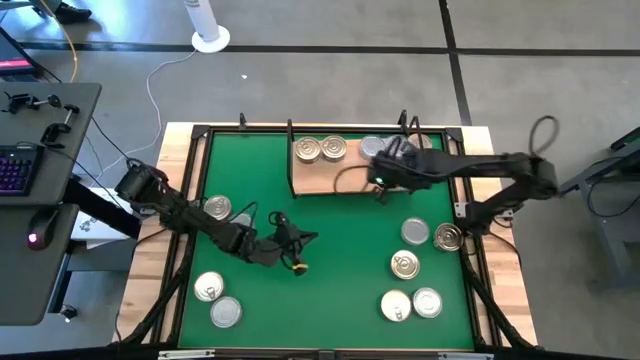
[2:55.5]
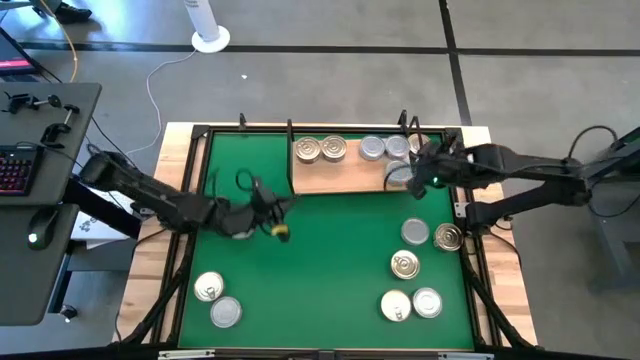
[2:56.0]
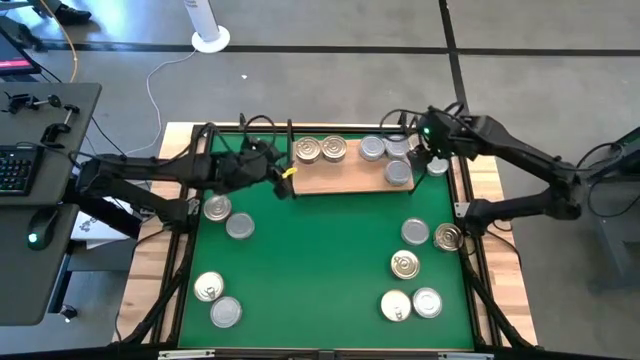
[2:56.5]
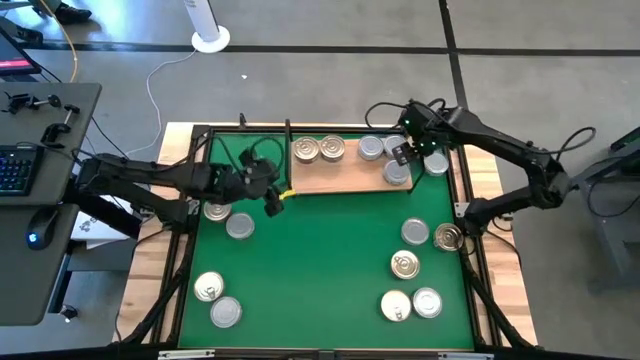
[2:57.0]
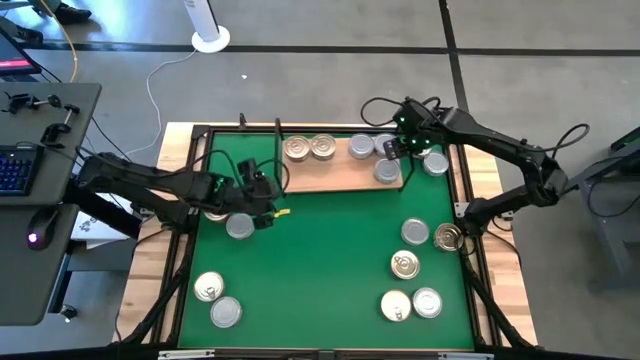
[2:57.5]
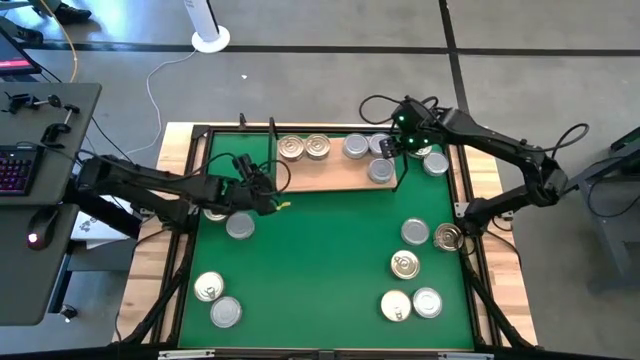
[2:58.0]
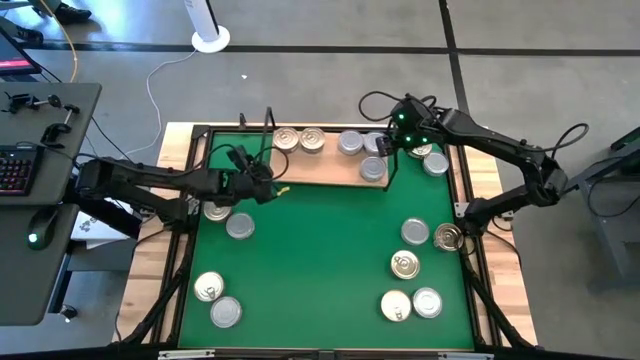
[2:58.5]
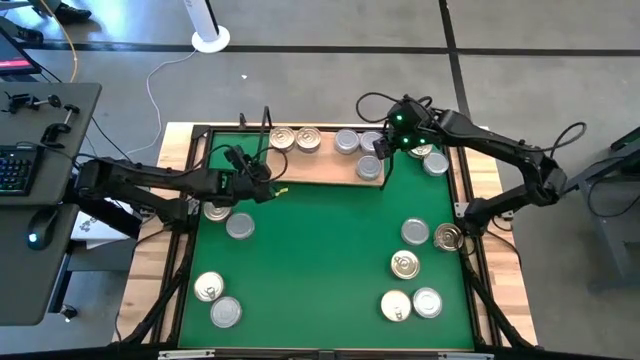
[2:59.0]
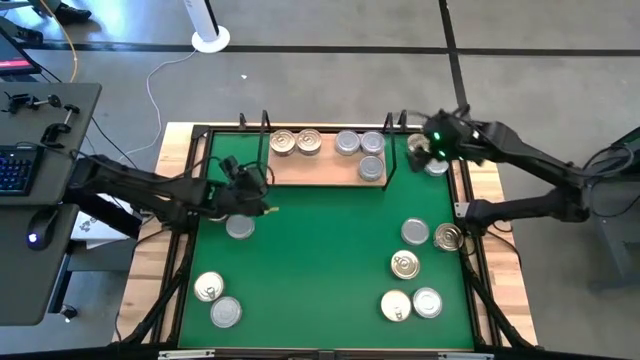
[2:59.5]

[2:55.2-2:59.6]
Task: Stack canned seafood by type on shelf
Adjust the shelf

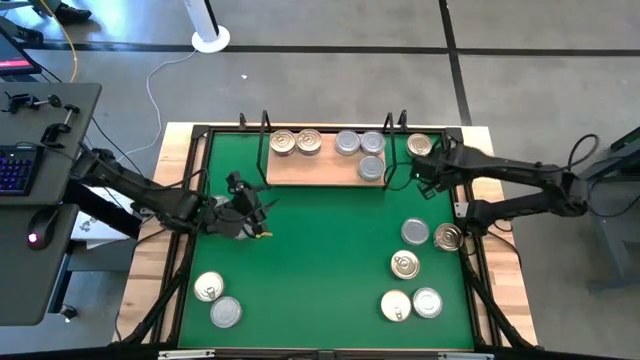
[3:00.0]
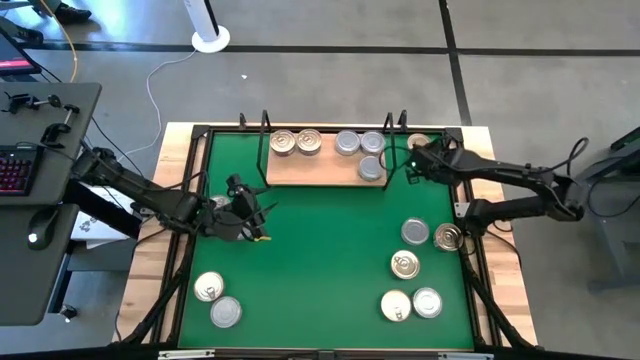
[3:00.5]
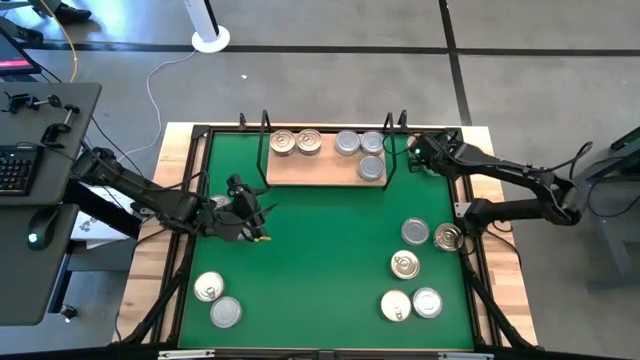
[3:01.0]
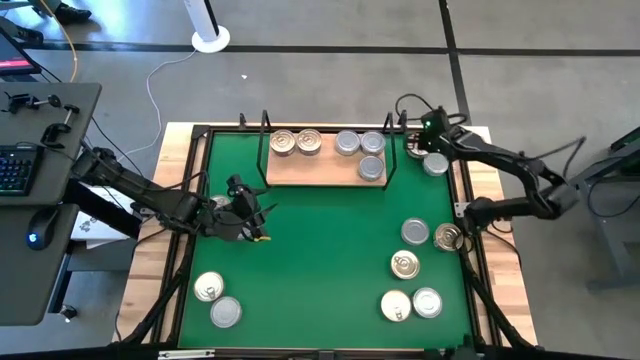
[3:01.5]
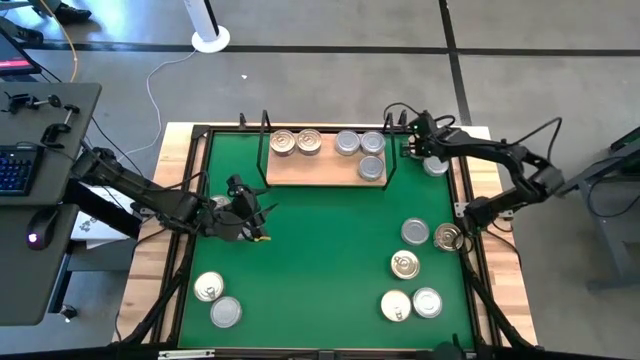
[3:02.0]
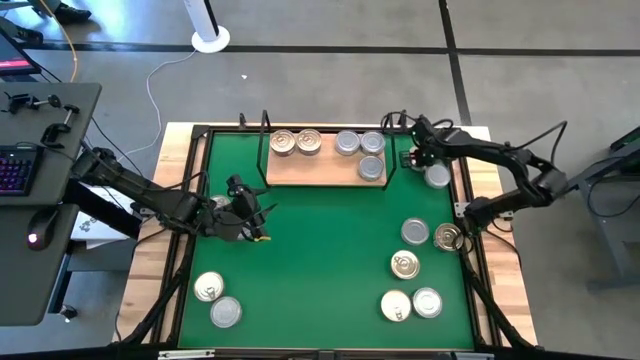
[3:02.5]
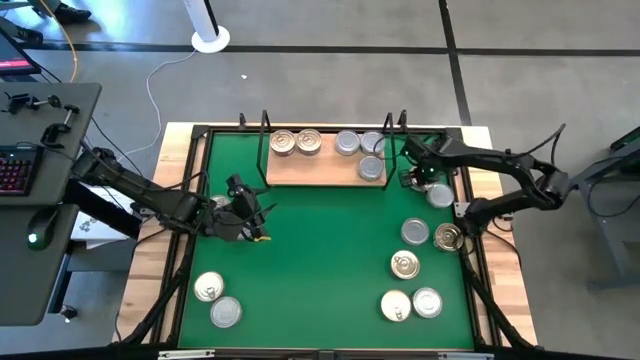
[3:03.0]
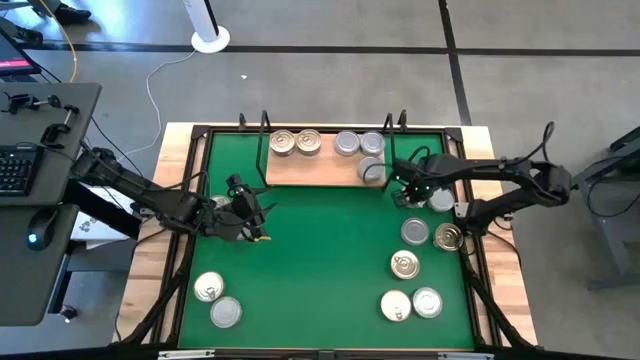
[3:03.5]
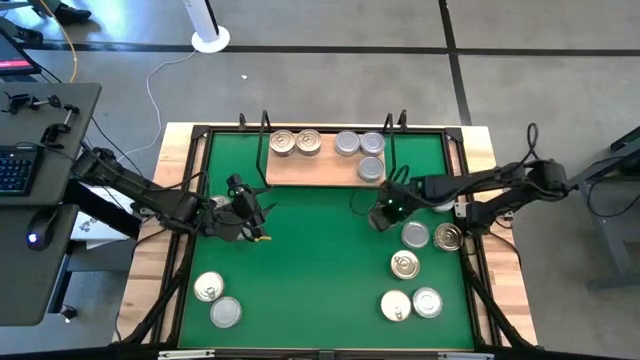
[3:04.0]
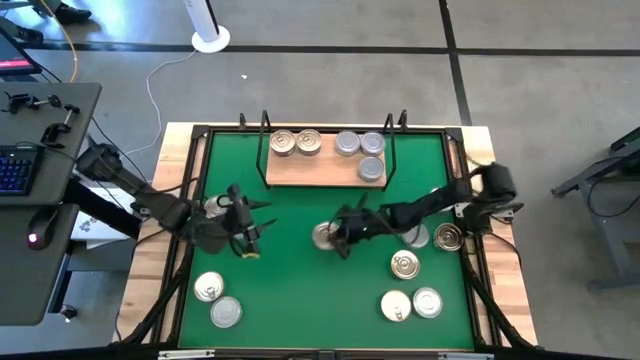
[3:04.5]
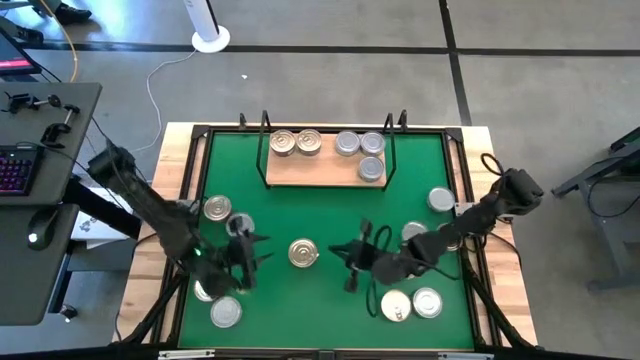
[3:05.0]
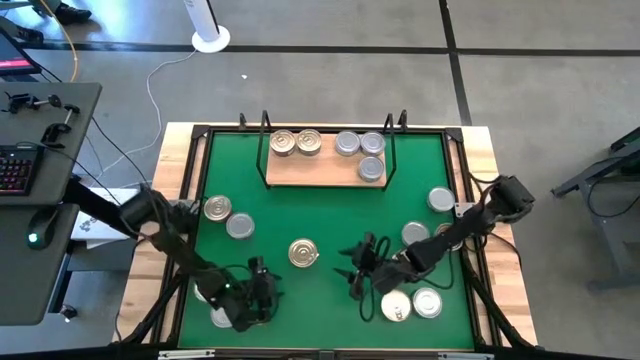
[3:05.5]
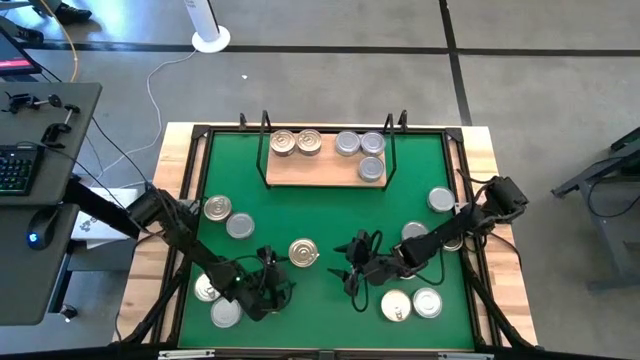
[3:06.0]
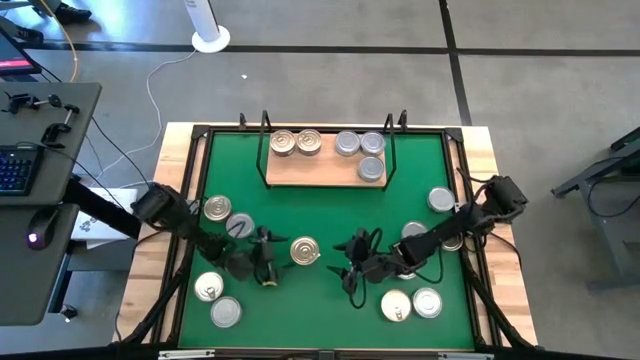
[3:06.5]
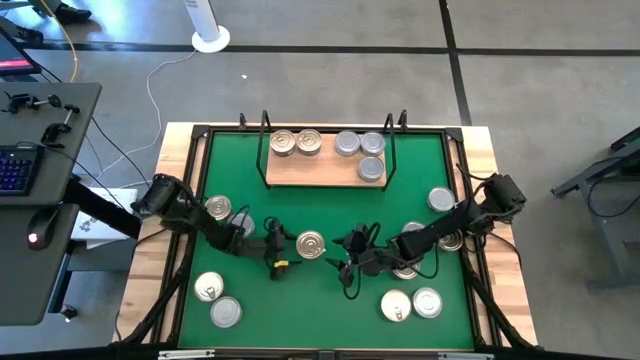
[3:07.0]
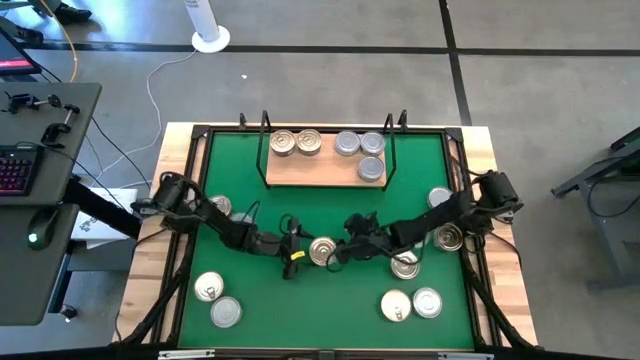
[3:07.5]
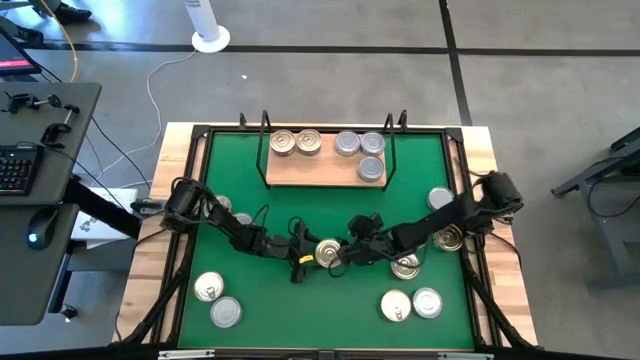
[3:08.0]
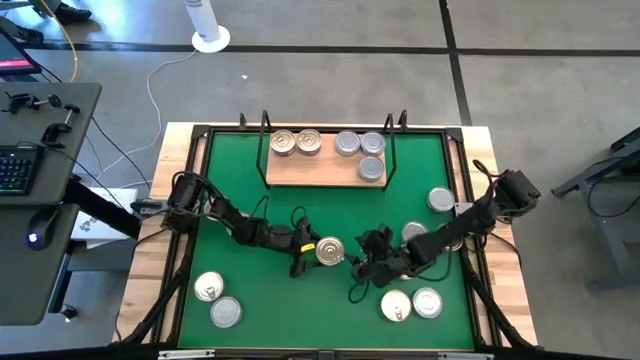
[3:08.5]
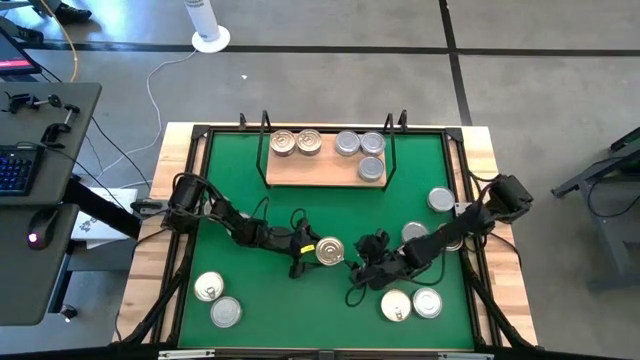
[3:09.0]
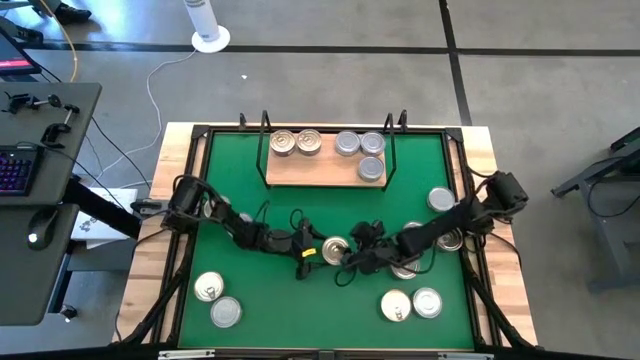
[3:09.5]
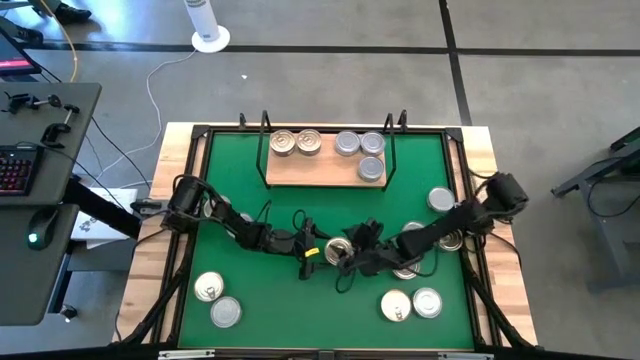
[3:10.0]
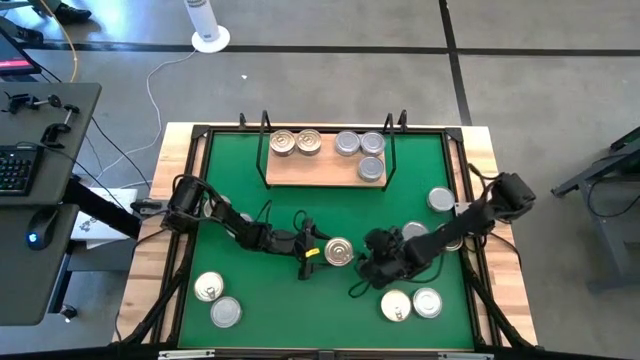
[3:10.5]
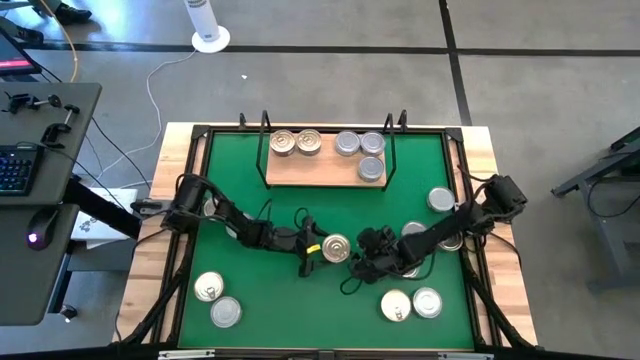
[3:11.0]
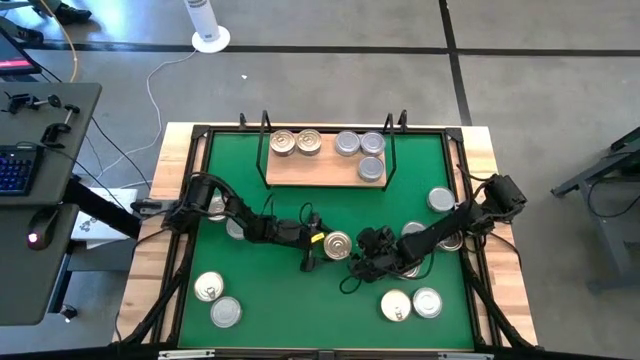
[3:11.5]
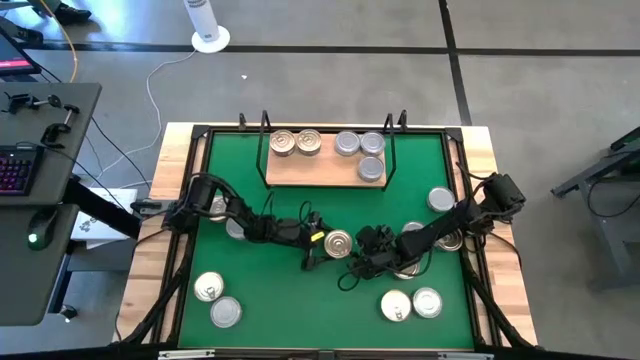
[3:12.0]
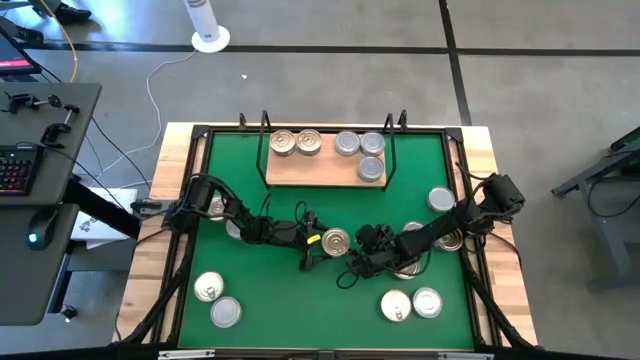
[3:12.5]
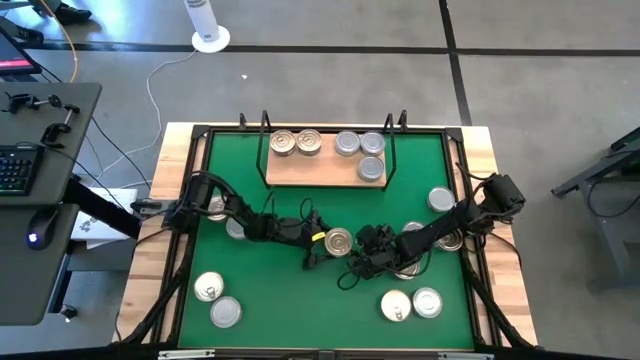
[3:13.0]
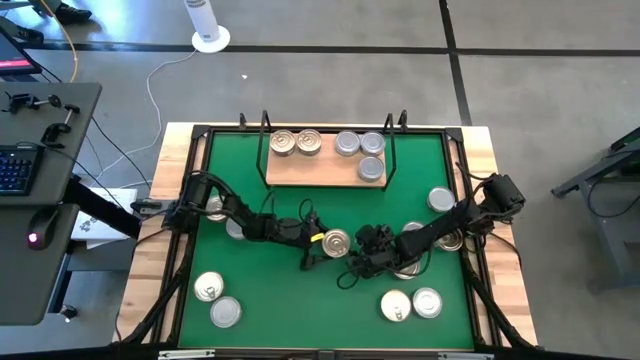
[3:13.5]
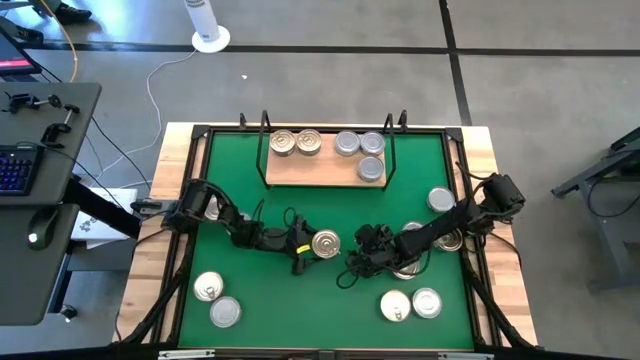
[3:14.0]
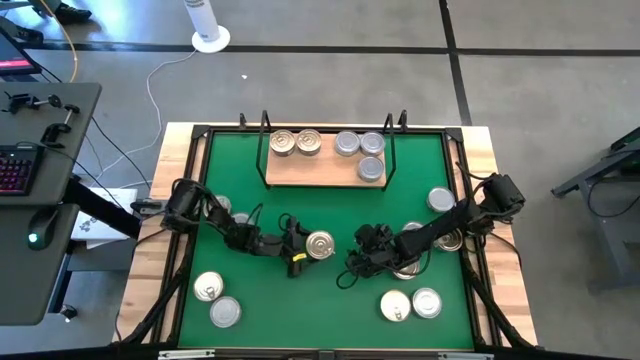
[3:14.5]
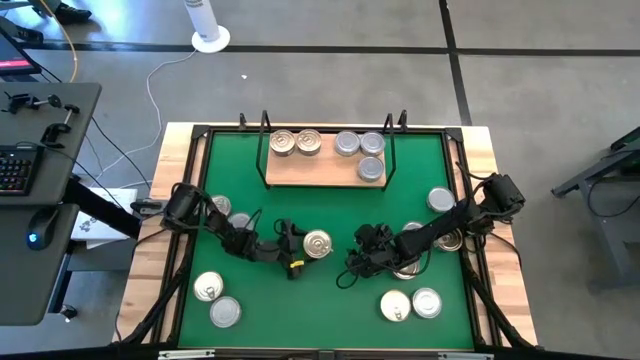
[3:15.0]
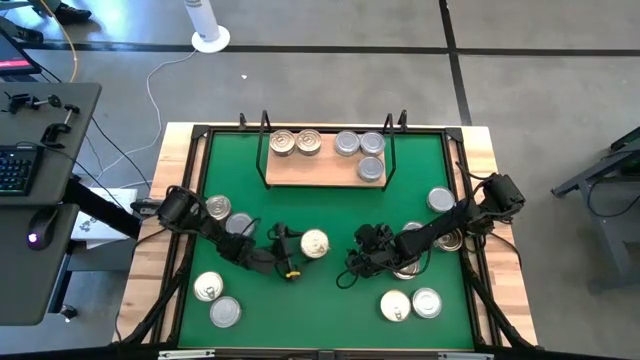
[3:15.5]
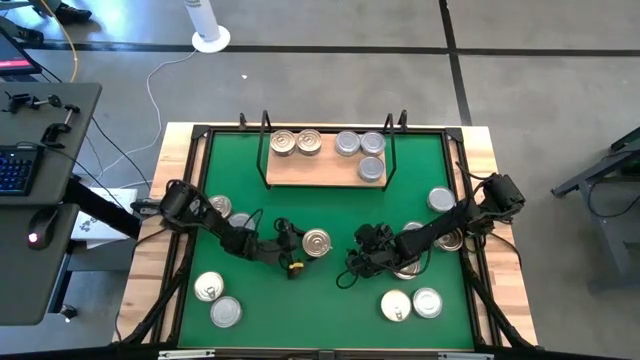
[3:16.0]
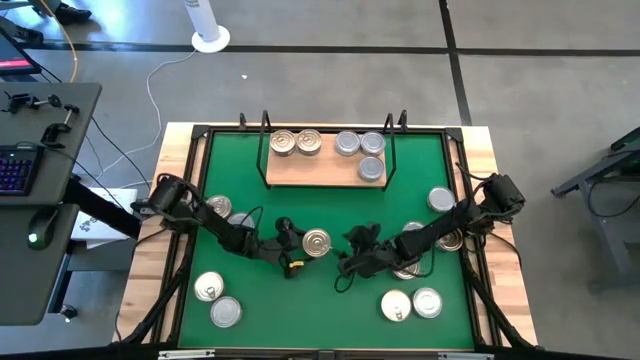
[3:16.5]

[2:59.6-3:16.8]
Put the blue/pink tuna can on the shelf and align with the other blue/pink tuna can
